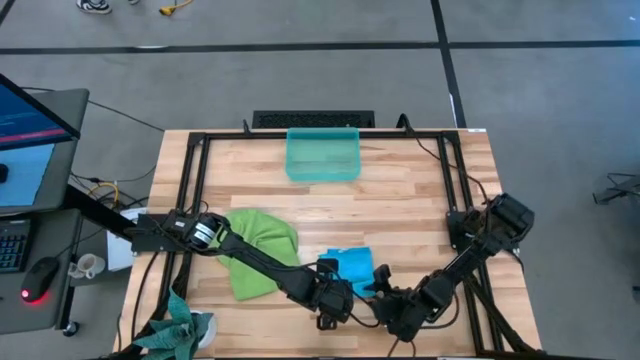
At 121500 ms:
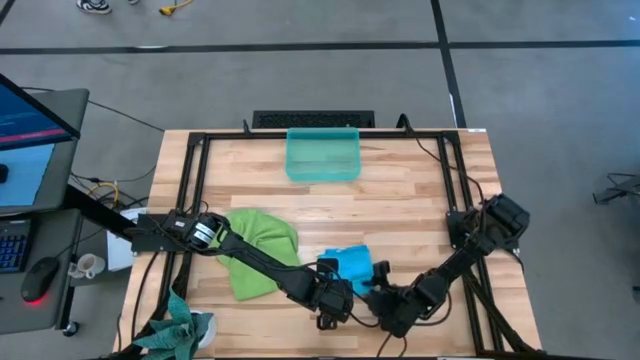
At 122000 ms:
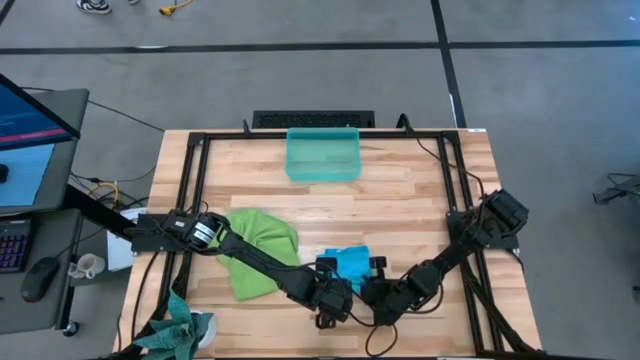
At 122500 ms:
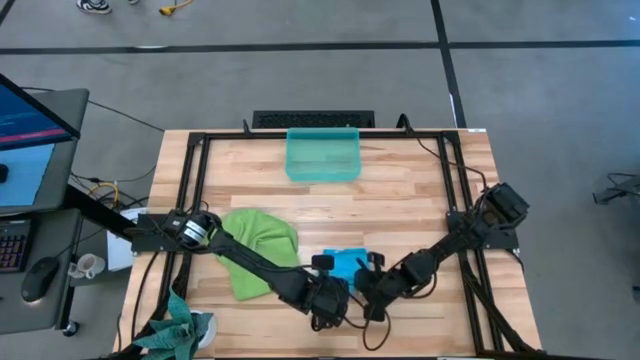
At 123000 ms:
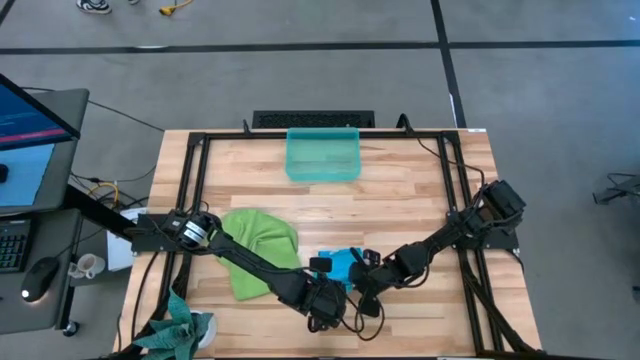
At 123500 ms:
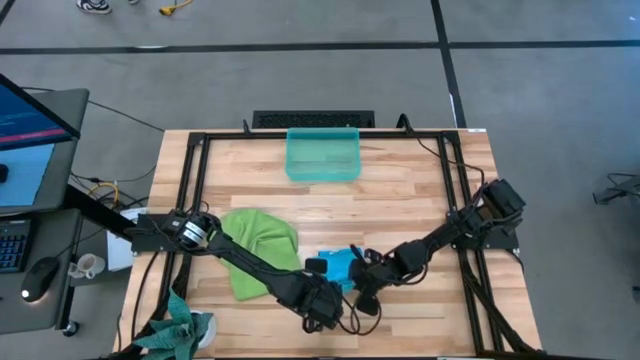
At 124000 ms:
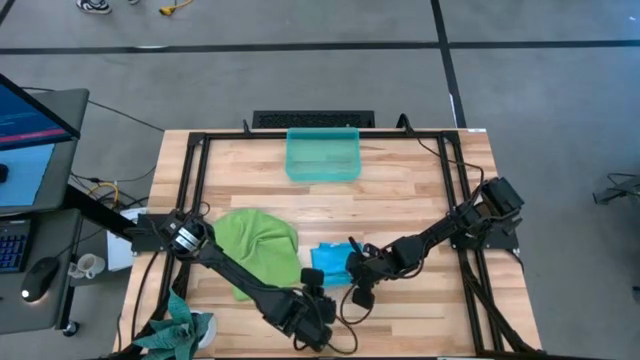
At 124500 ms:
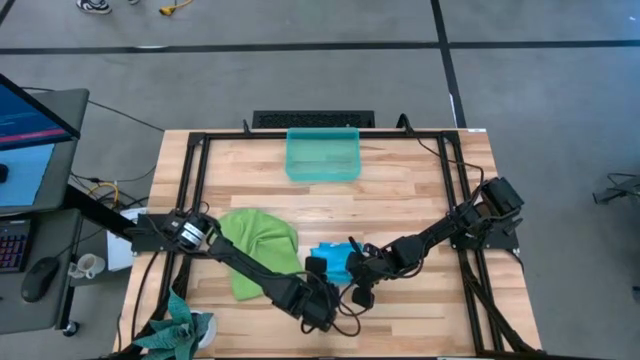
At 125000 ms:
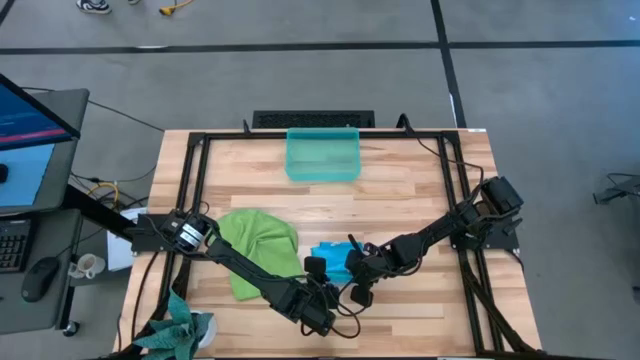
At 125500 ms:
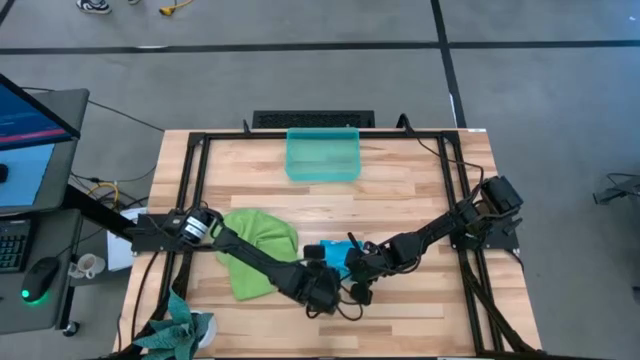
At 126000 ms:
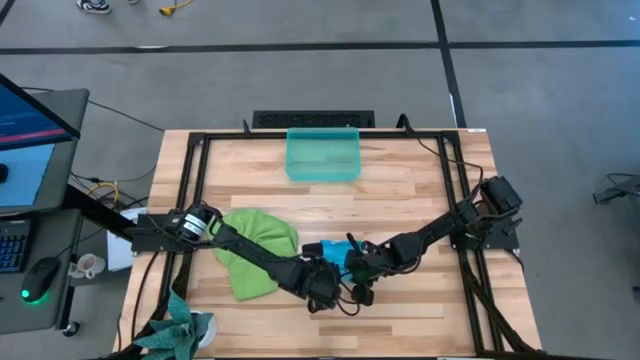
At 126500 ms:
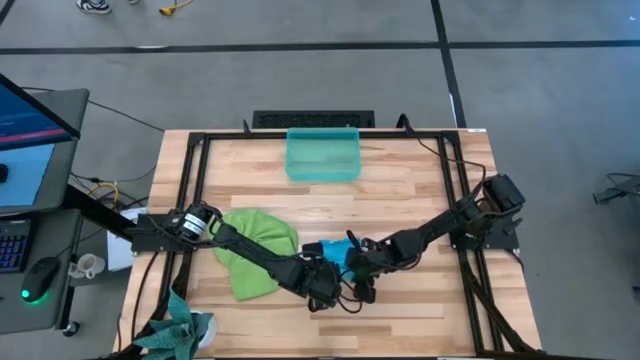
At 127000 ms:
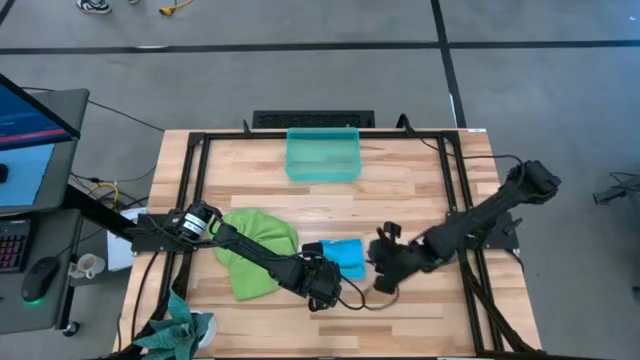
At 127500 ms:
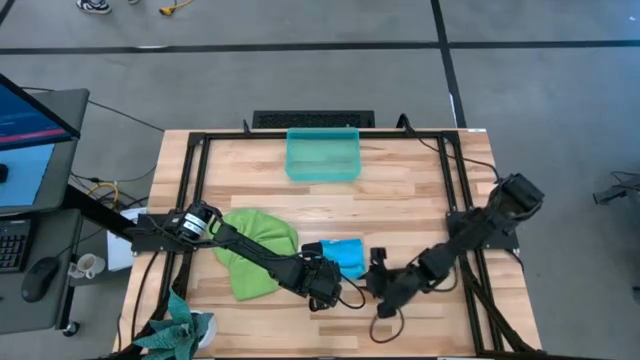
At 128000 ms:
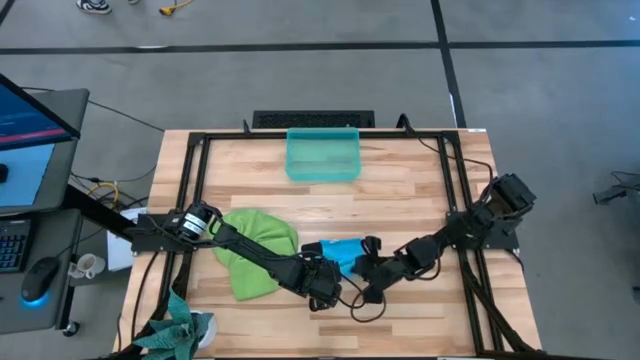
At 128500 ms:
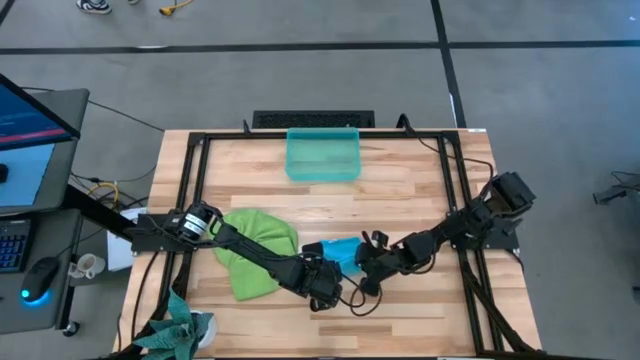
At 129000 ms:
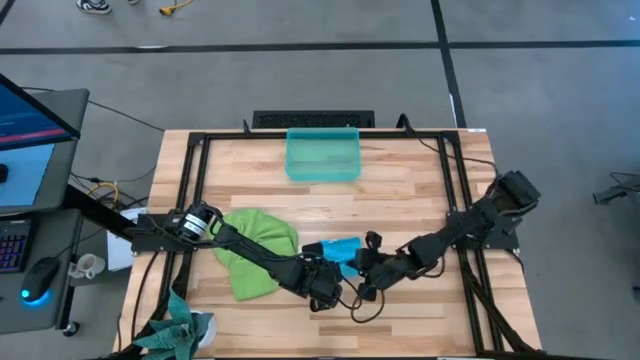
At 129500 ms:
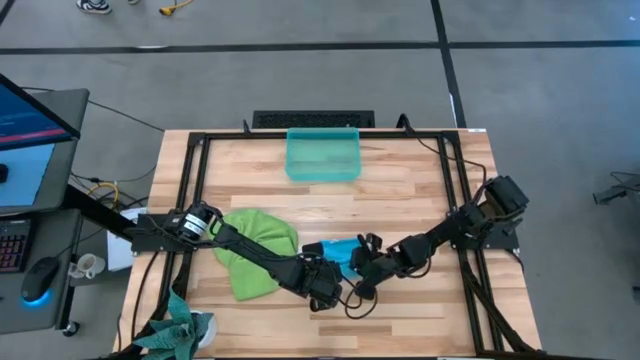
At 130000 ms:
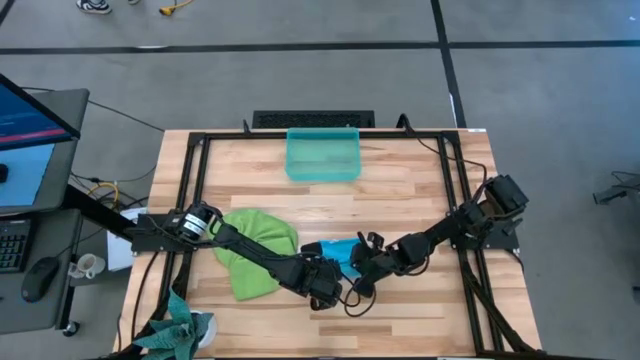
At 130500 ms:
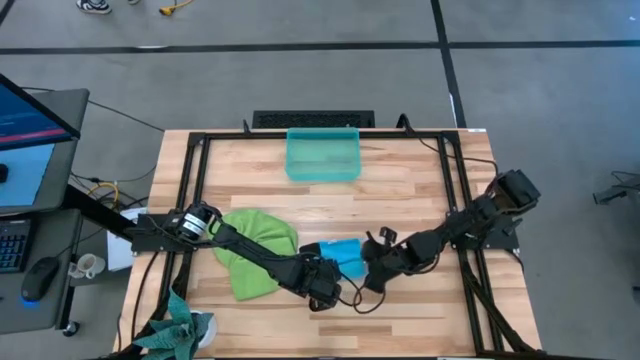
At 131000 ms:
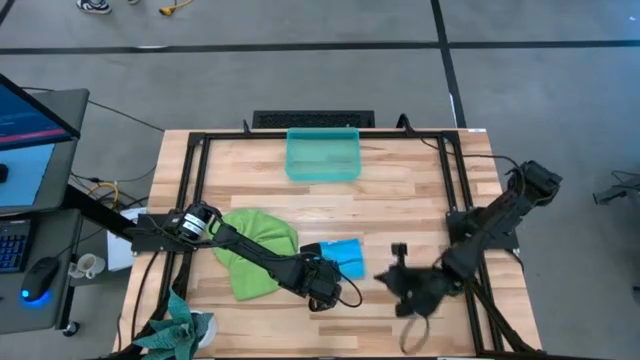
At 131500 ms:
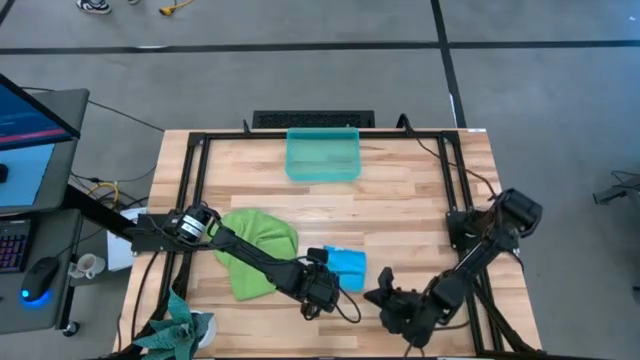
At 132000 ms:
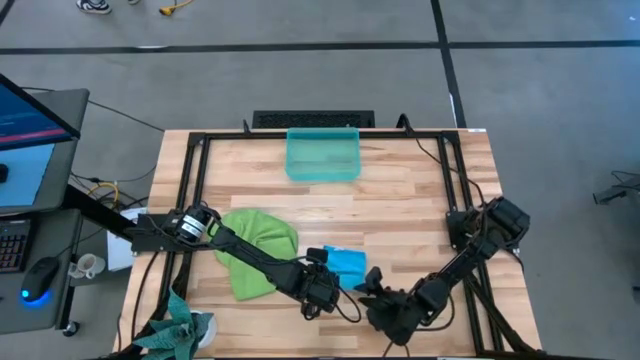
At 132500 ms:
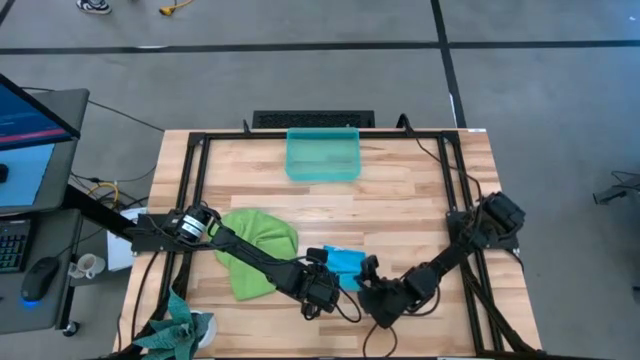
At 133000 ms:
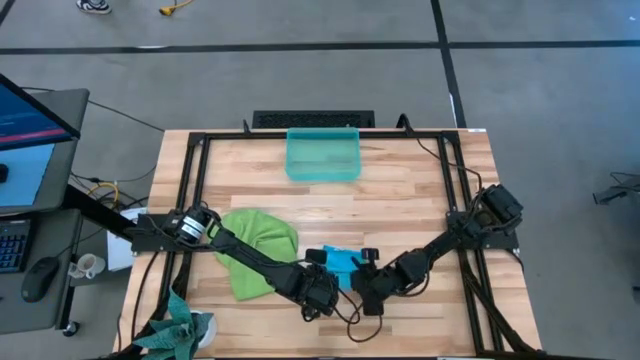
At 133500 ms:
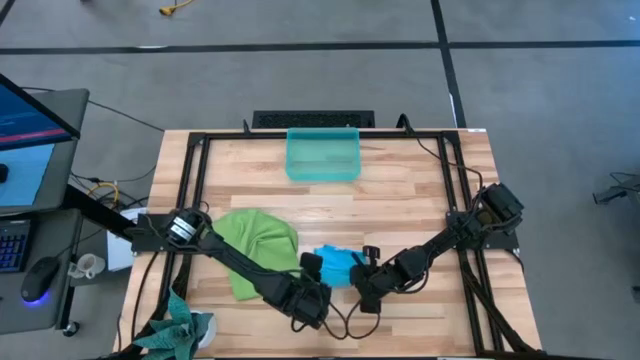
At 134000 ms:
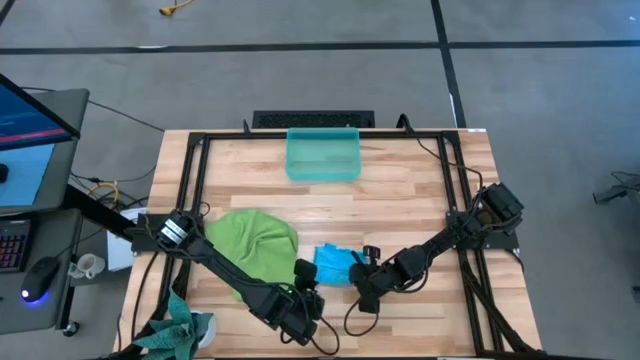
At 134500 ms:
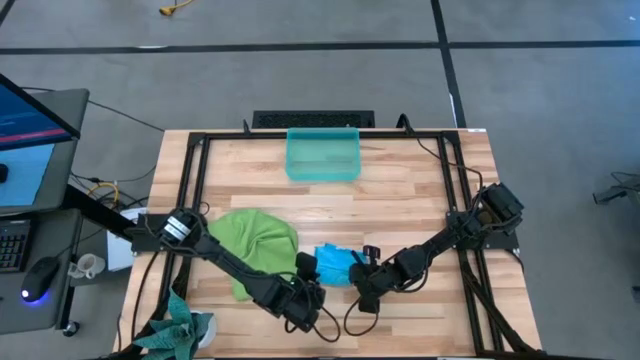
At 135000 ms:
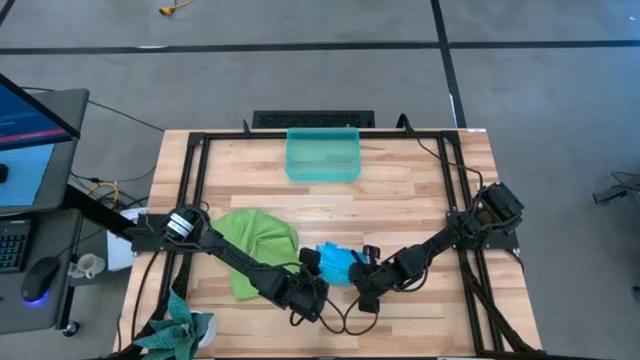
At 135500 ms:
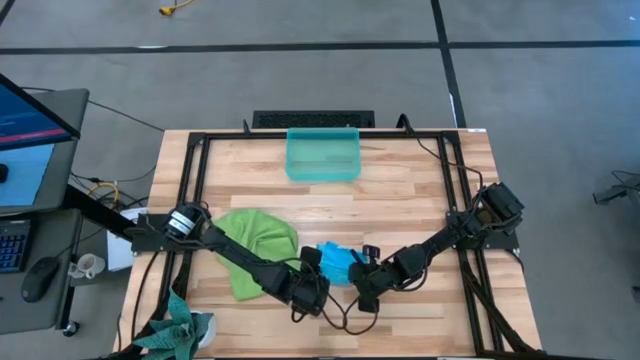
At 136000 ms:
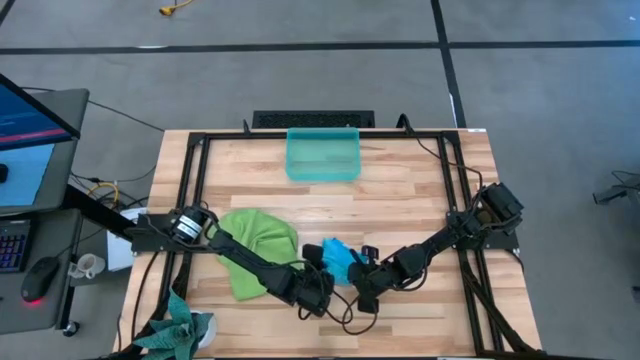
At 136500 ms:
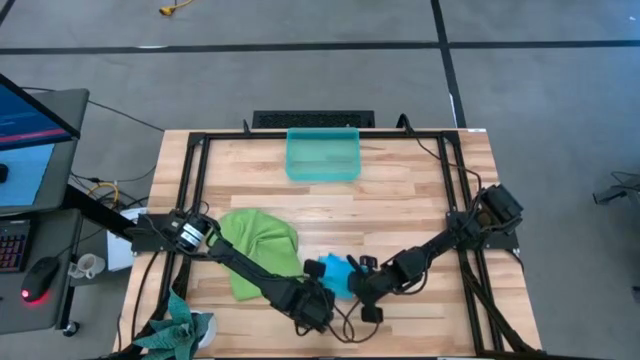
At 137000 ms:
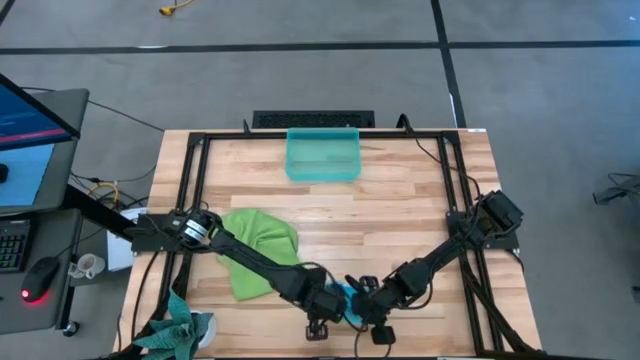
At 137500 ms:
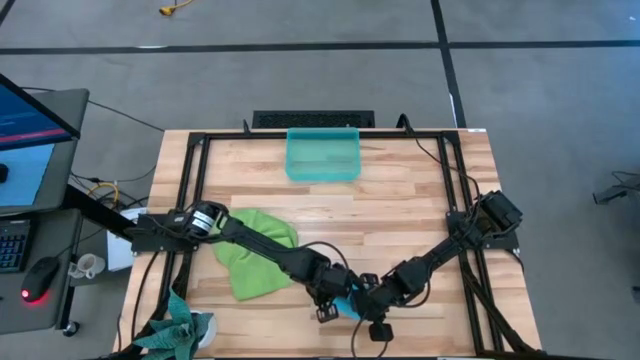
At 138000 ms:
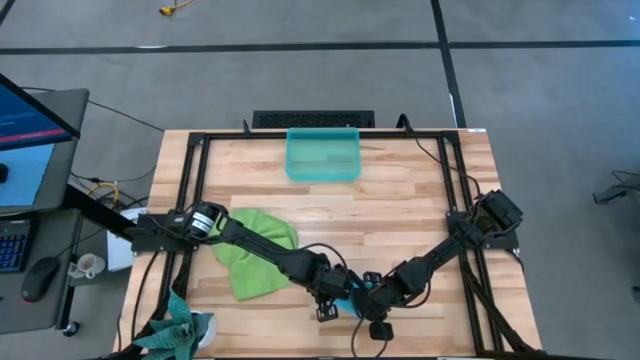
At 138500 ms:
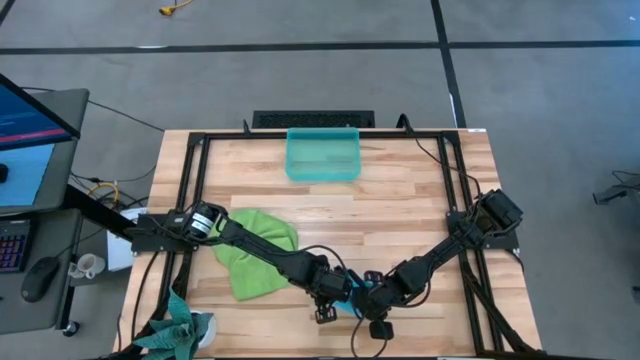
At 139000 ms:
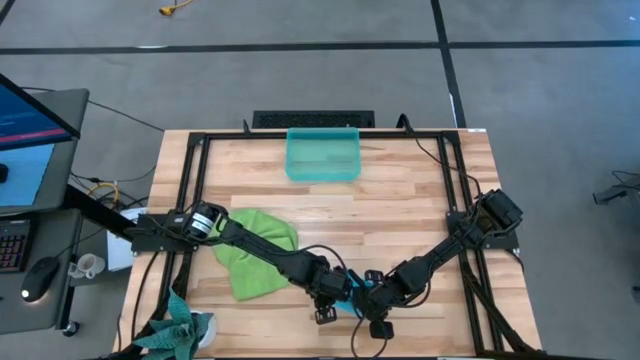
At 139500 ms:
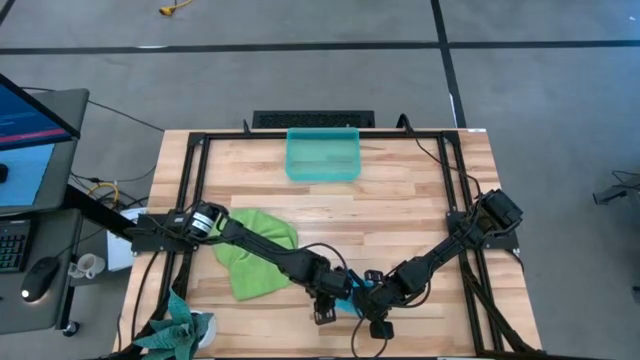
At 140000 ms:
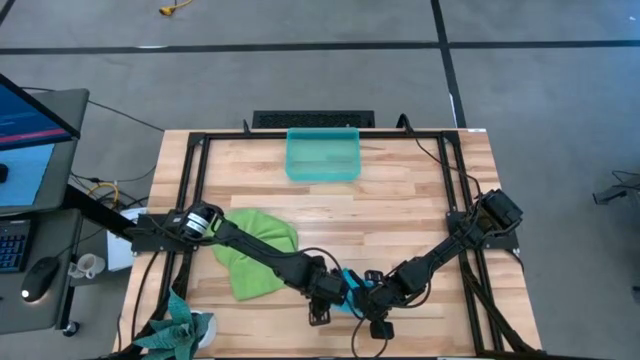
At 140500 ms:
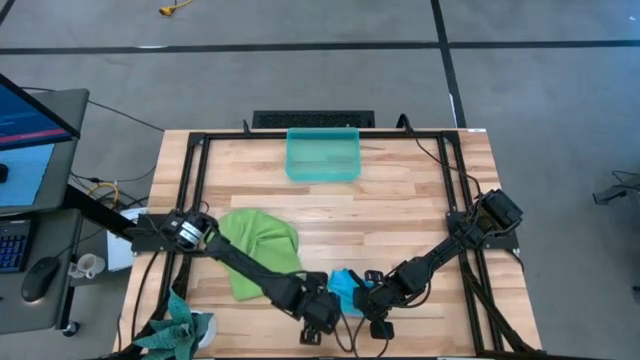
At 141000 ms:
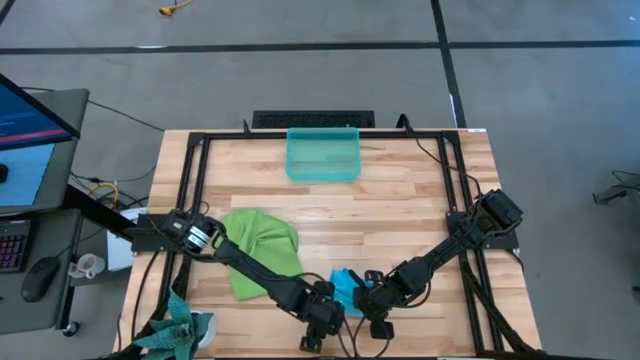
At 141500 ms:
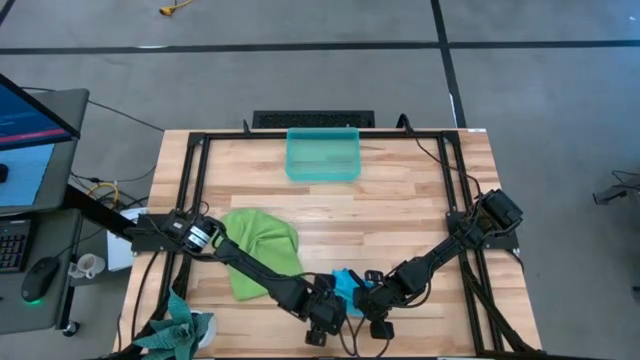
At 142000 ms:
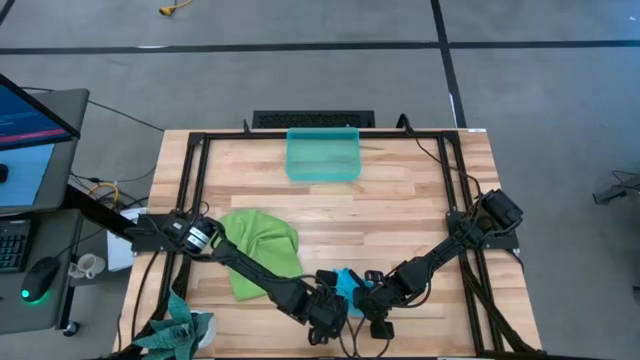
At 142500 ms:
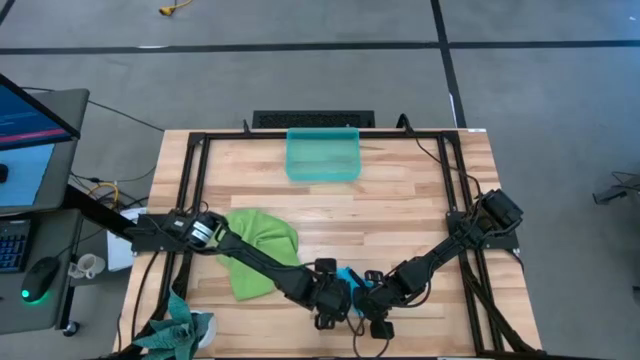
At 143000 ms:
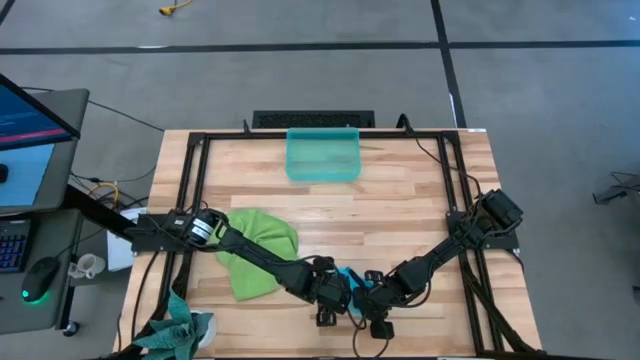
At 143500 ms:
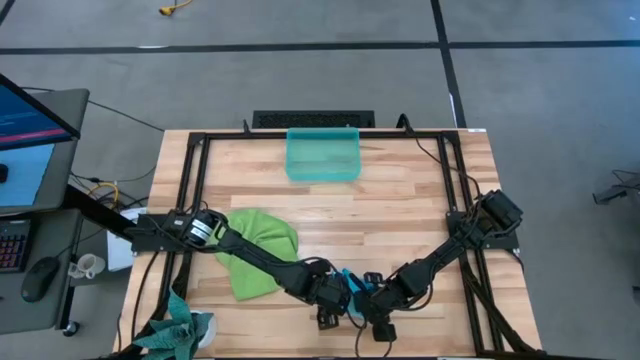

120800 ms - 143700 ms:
Task: Roll microfiber towels into tight, uniform cylinder then place into a basket
Roll the blue microfiber cloth
